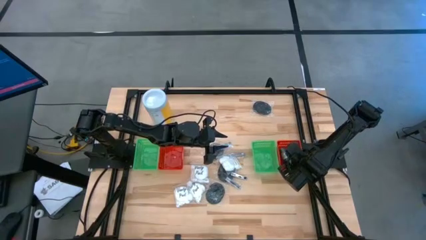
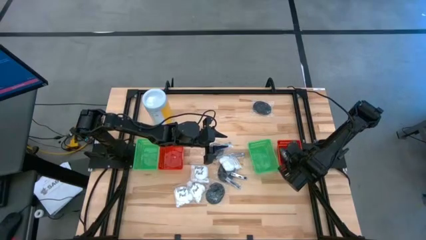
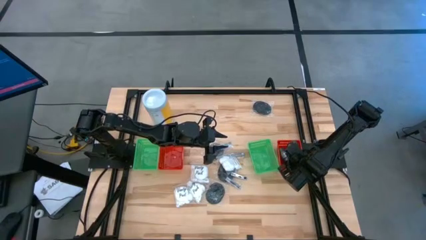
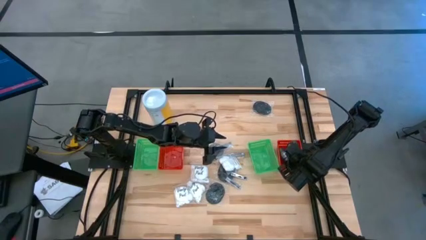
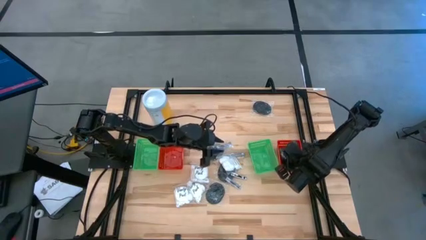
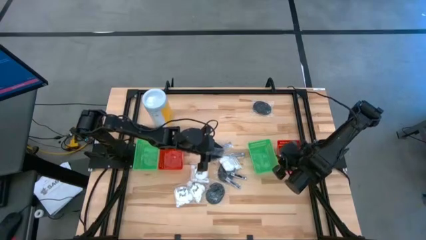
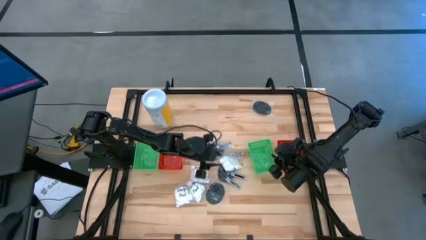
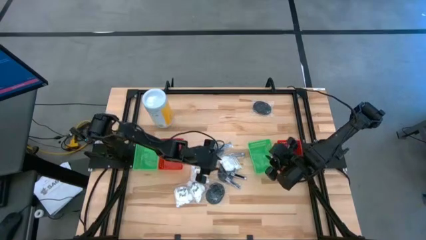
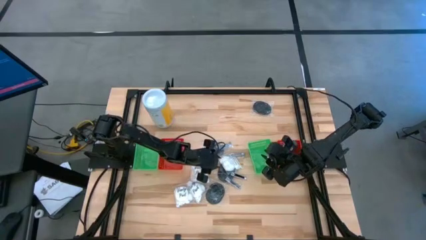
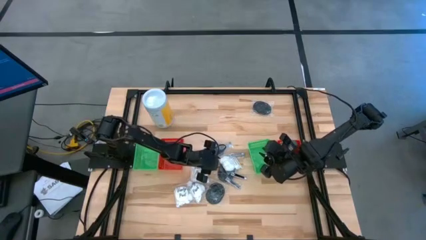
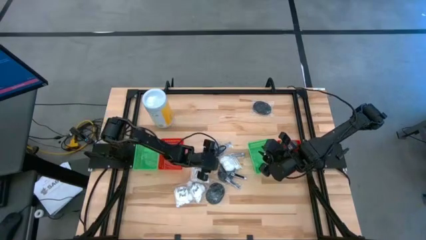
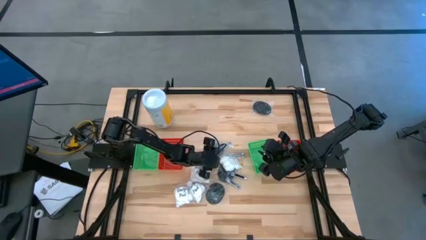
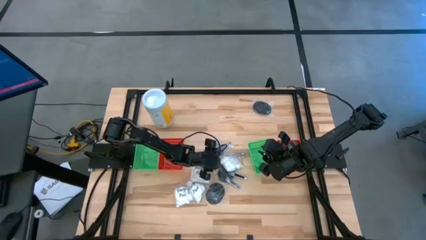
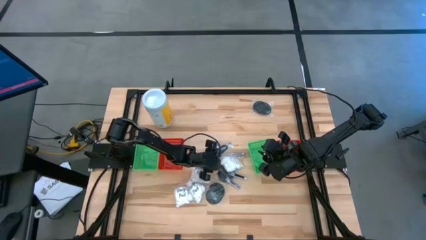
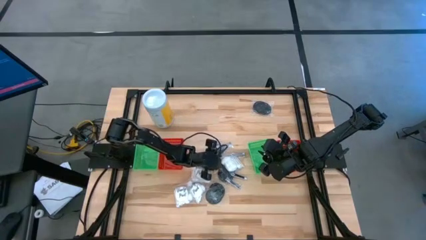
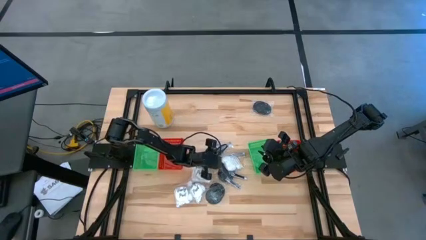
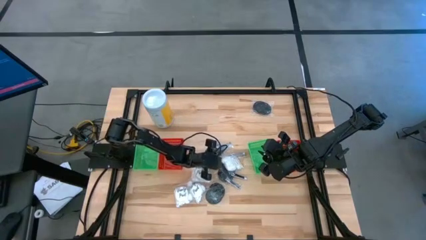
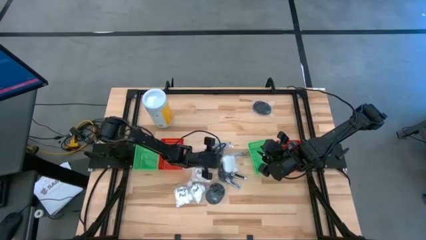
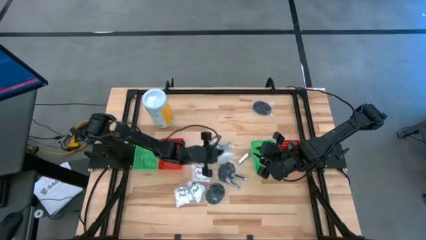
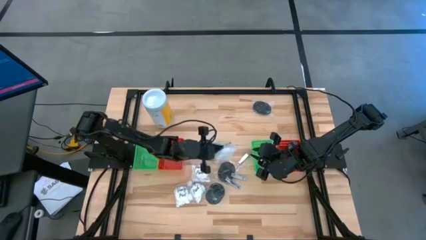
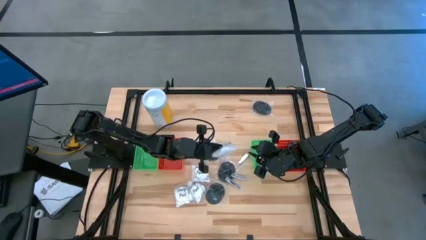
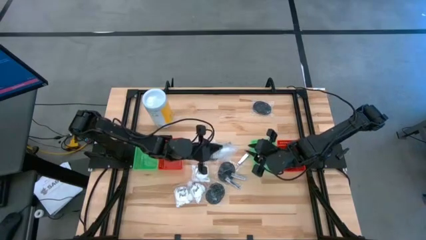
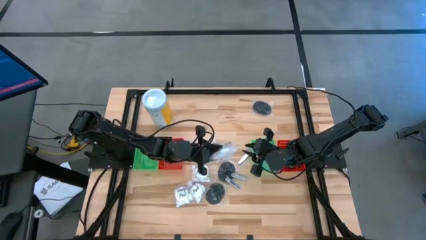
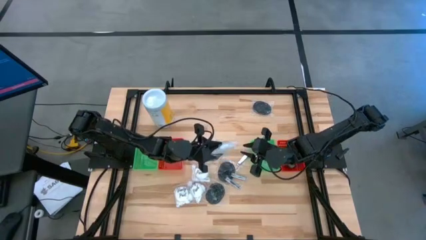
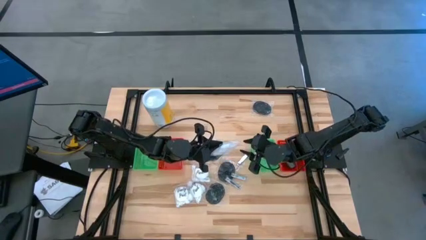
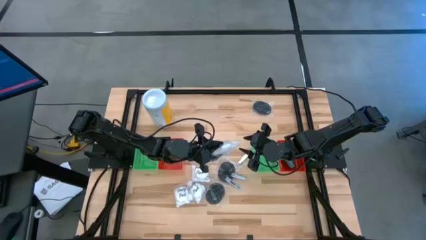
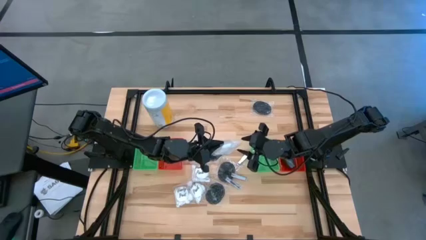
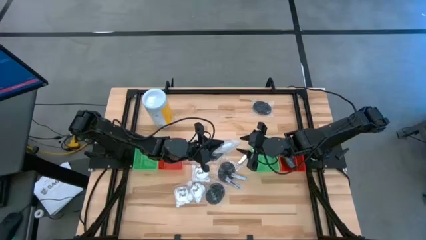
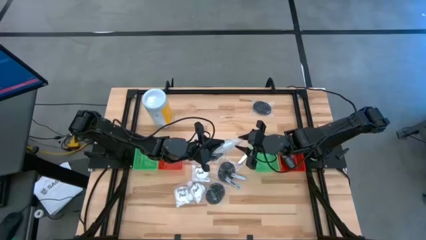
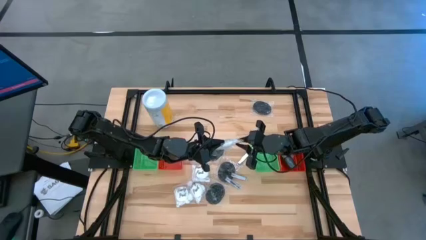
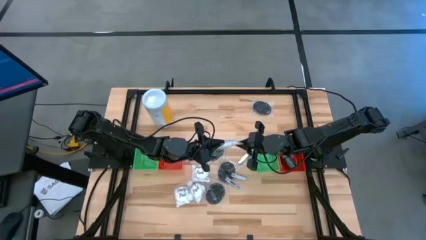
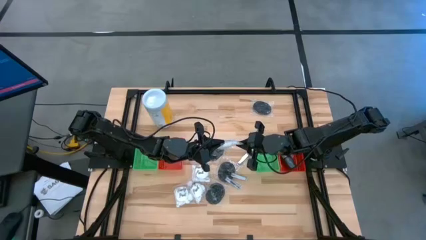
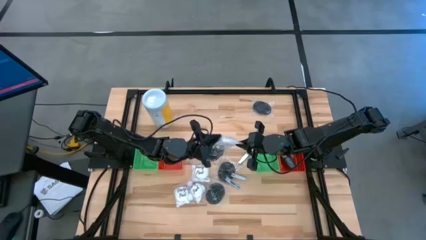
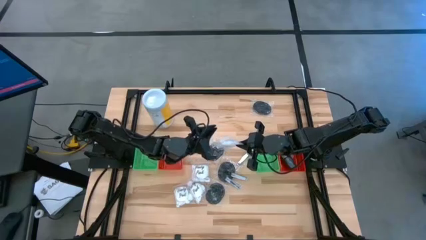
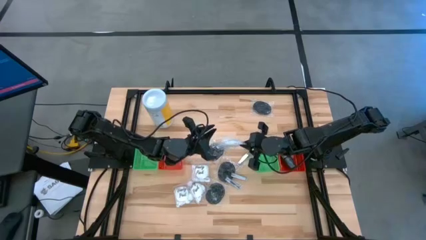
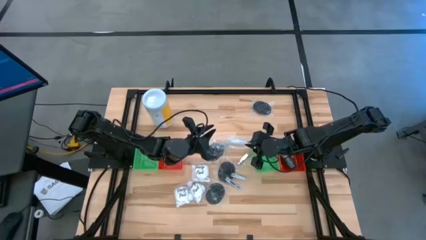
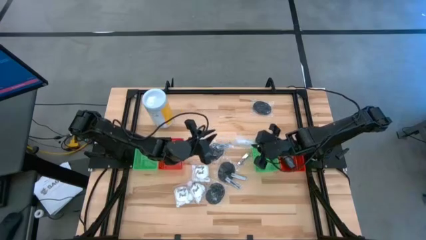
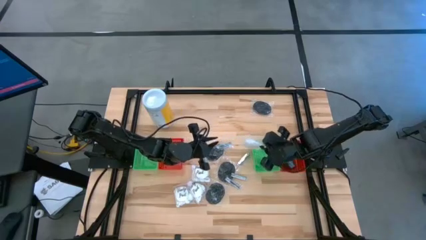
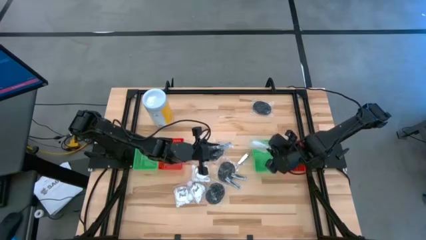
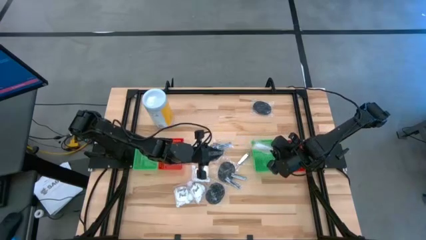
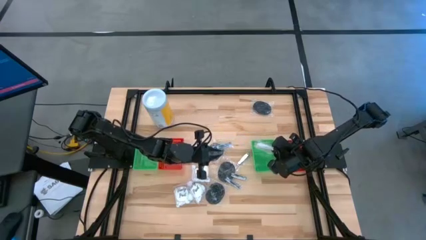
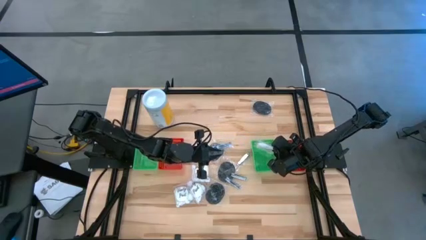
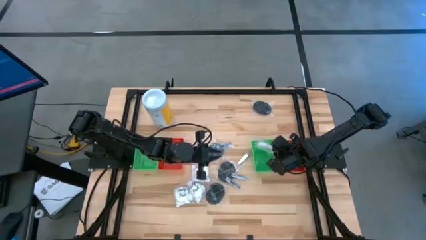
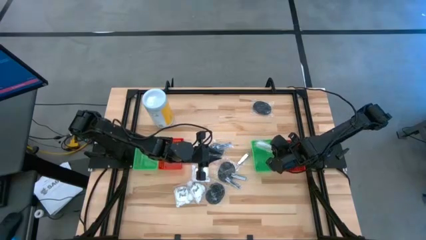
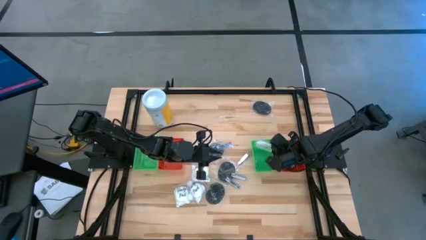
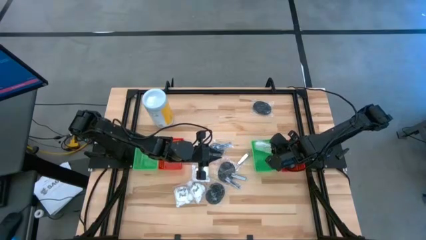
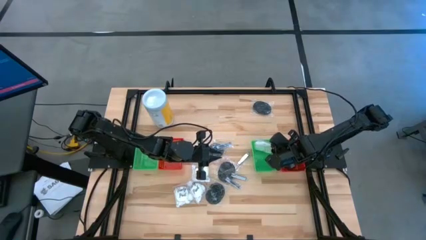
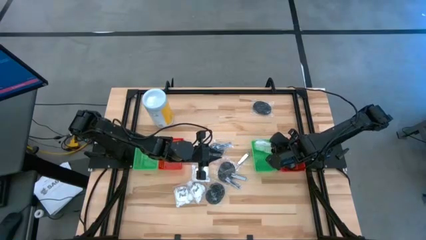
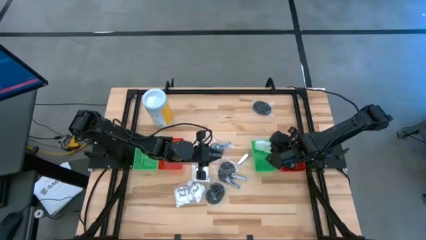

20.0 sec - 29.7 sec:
Task: Pick & Place Travel size toiletries
Put the white cotton pack into the right green bin

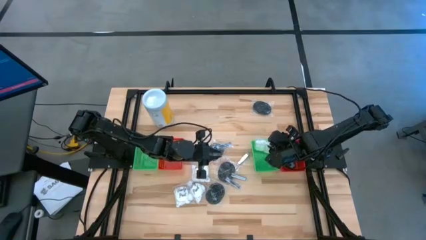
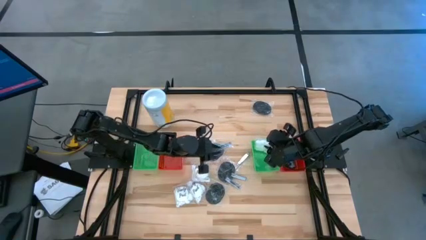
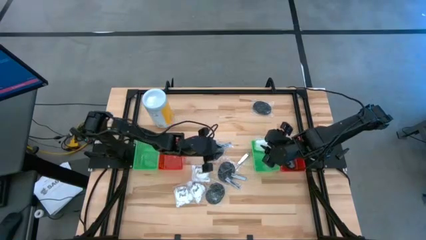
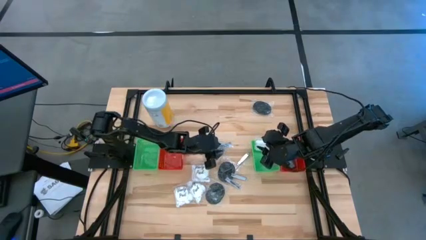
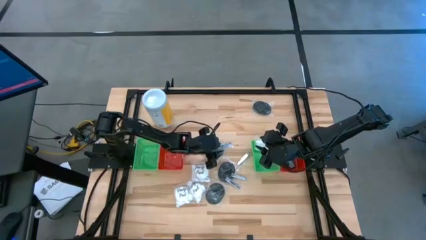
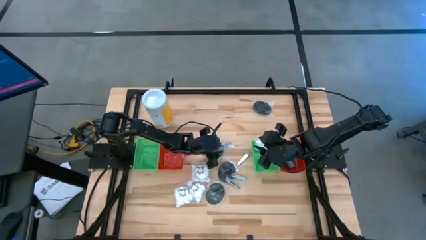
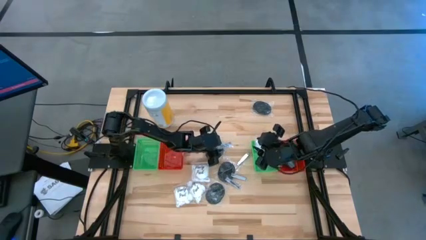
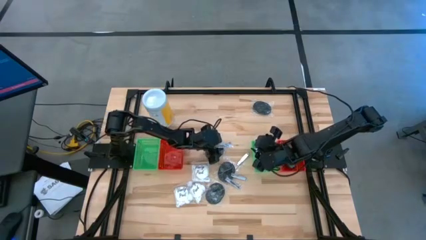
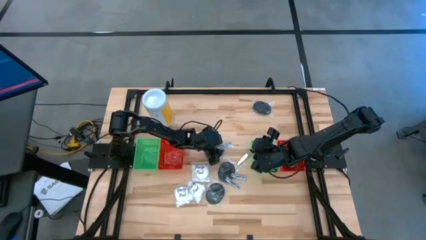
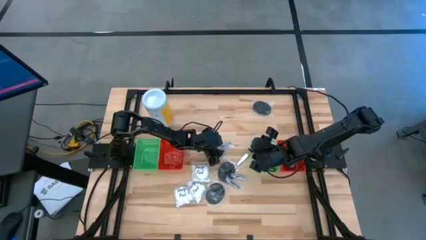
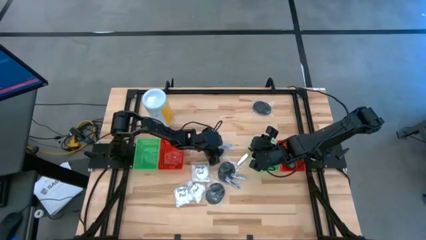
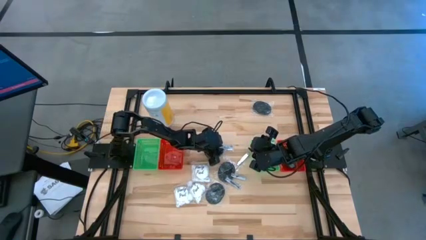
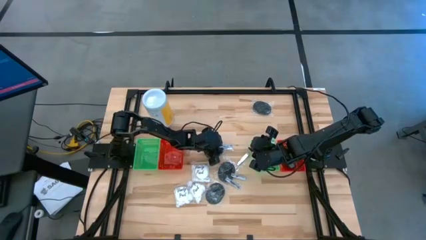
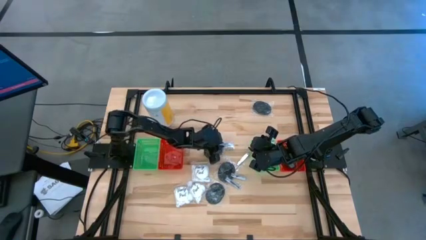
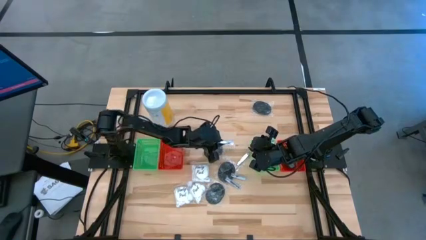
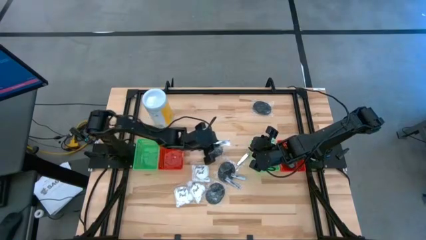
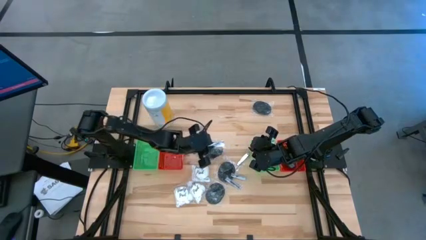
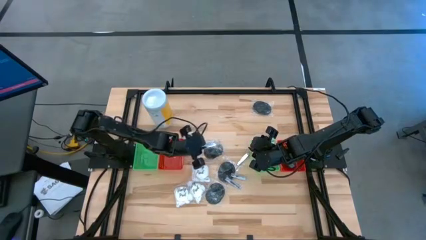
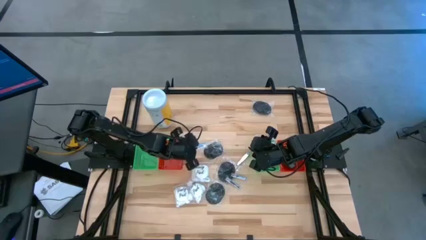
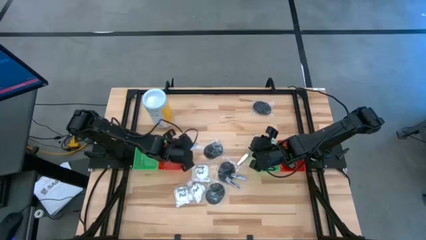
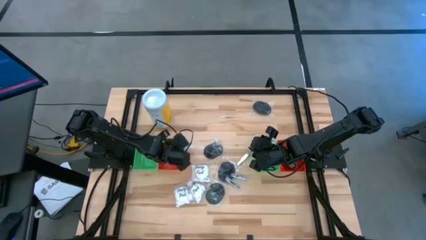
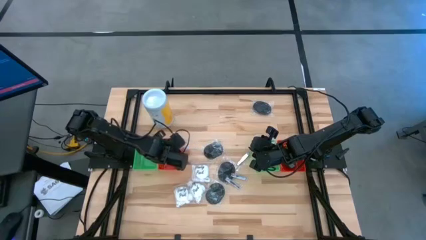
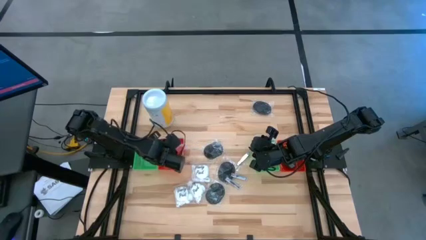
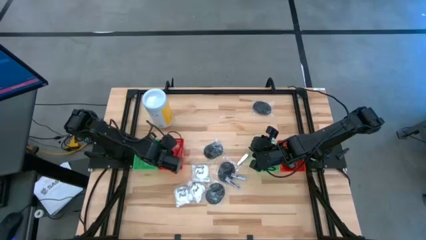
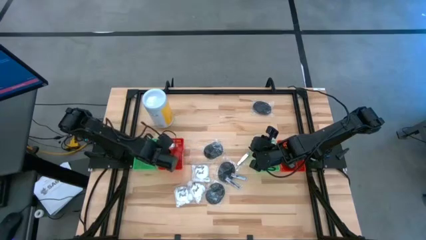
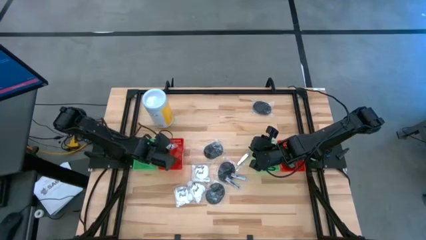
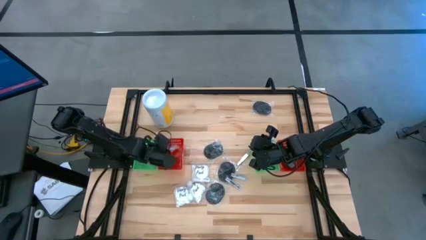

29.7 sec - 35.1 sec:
Put the silver nail cutter into the left red bin
